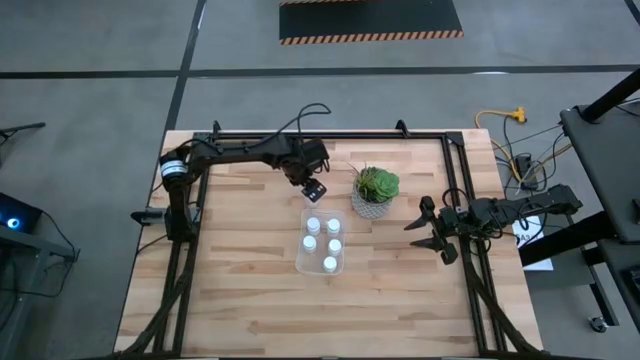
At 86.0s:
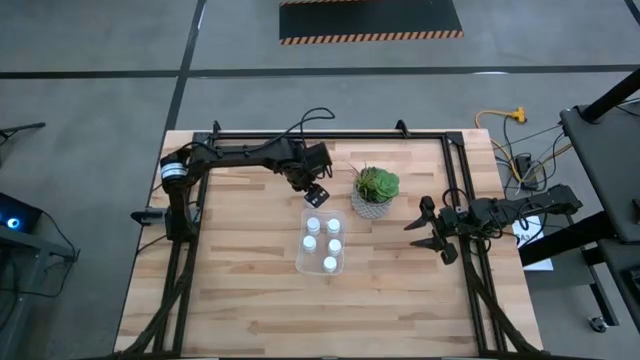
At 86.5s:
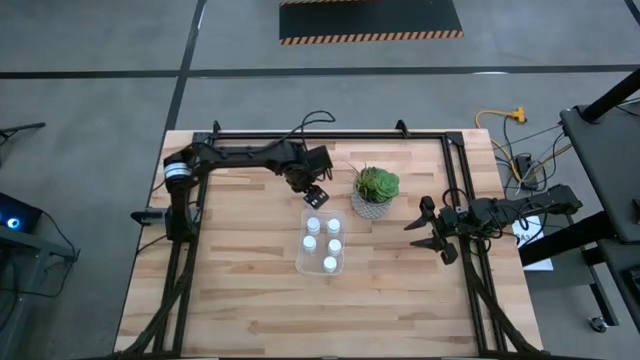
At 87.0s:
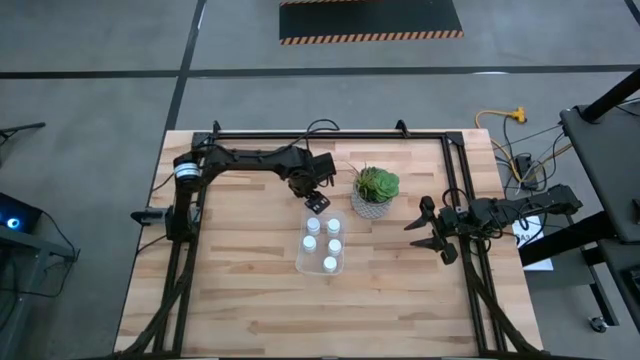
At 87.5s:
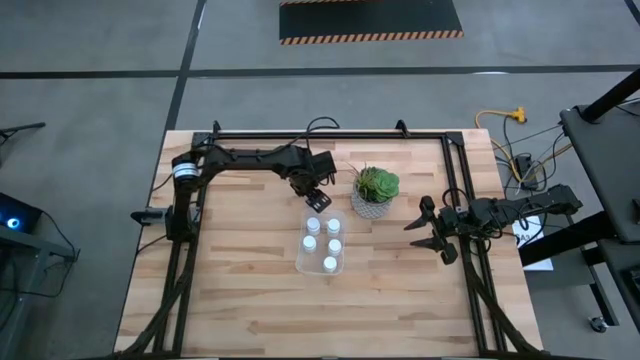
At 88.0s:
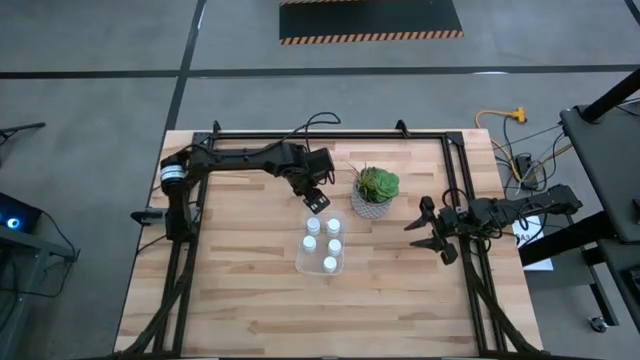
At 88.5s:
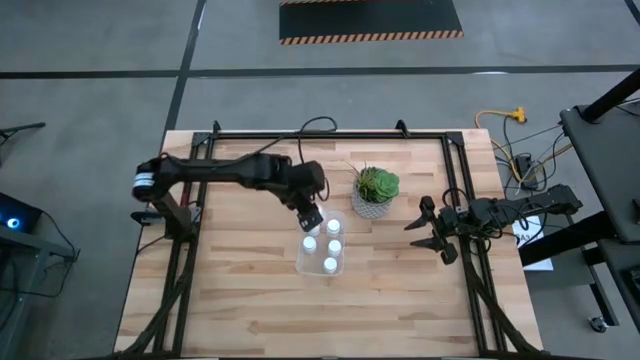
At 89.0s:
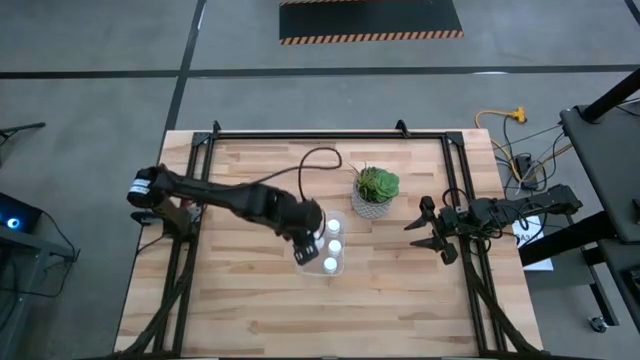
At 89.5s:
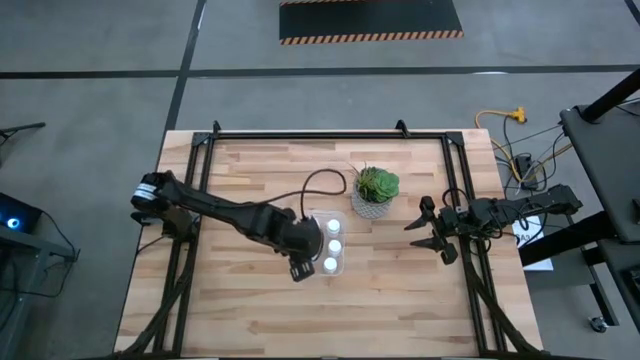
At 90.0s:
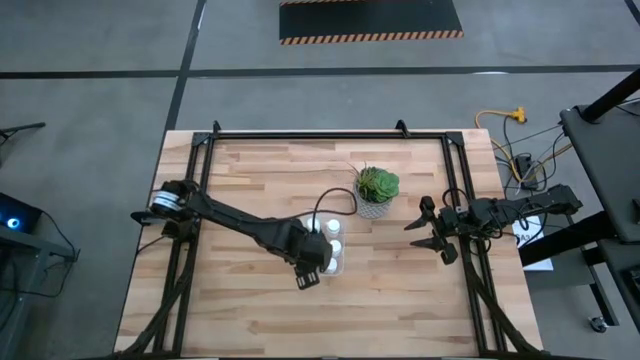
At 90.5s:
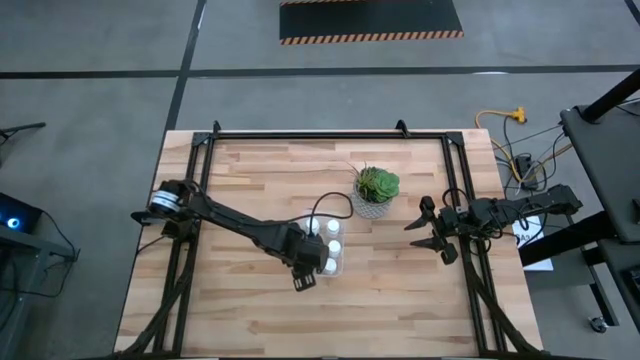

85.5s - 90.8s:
Task: Pick and place pill bottles into a basket
Put the white medicine bottle into the transparent bin

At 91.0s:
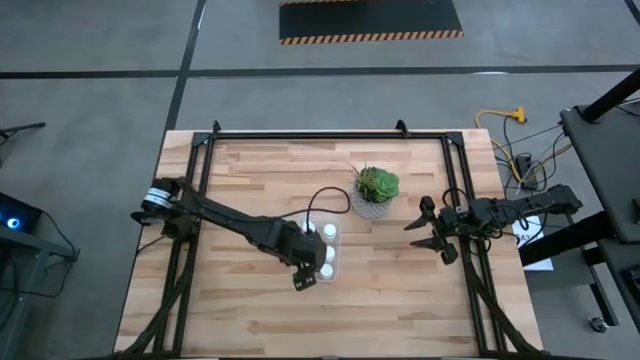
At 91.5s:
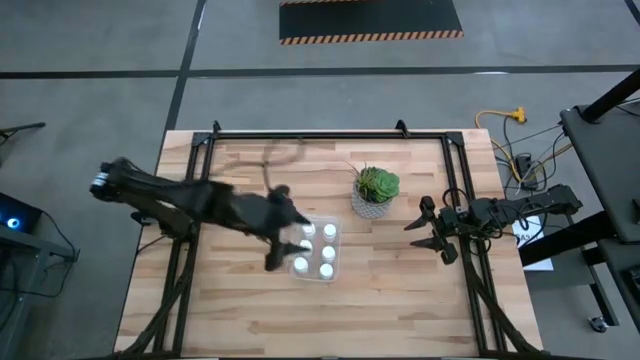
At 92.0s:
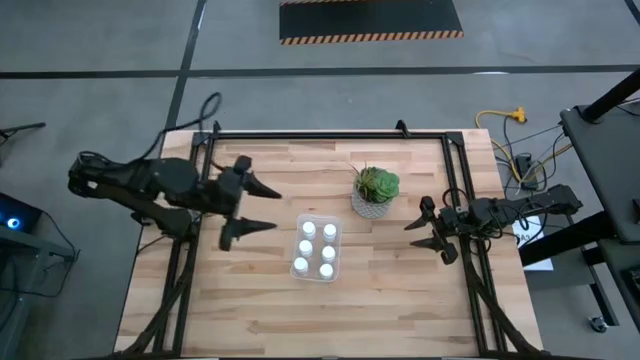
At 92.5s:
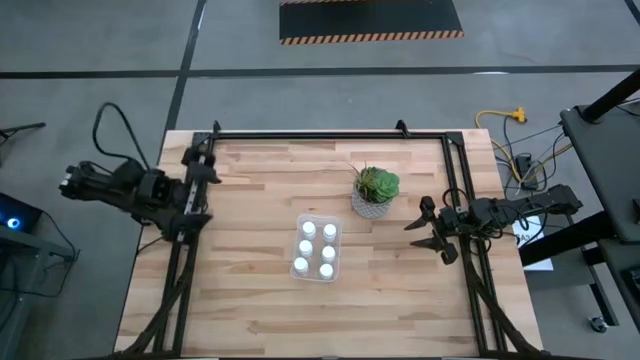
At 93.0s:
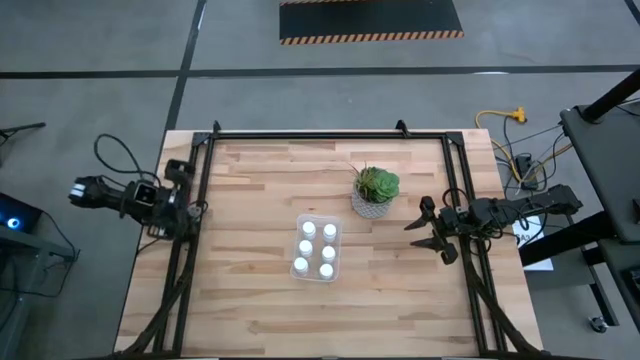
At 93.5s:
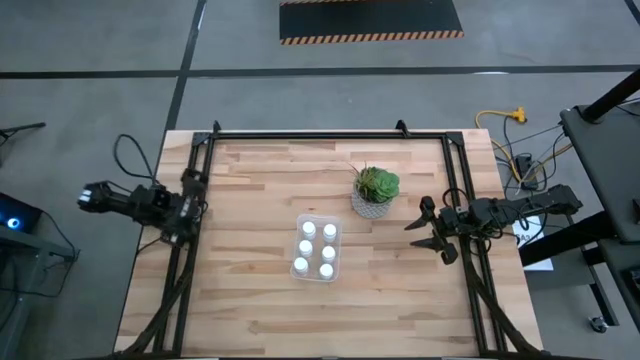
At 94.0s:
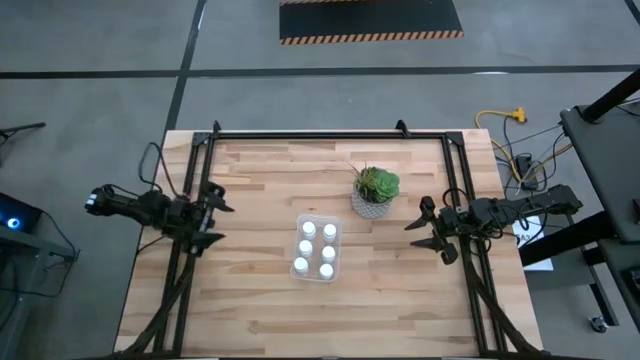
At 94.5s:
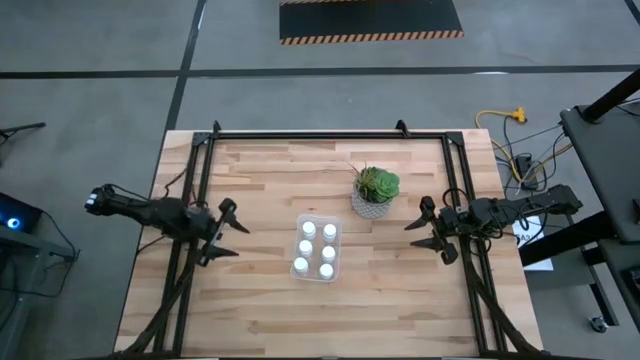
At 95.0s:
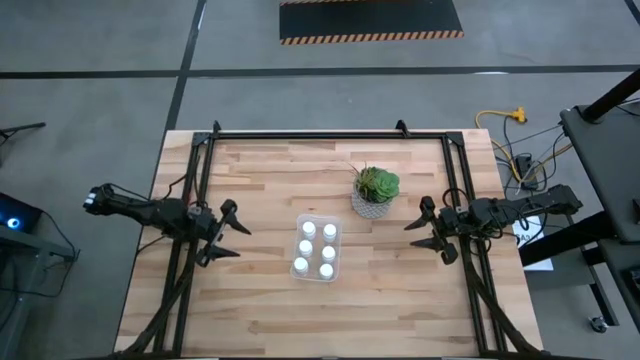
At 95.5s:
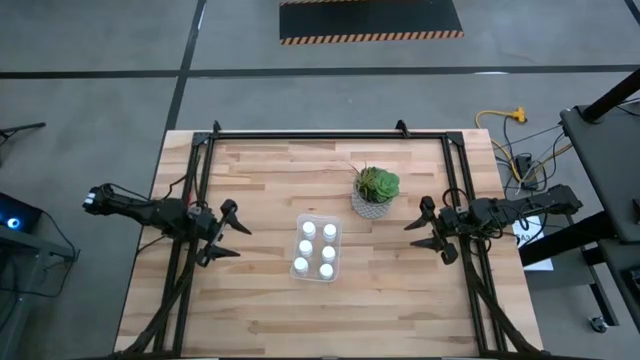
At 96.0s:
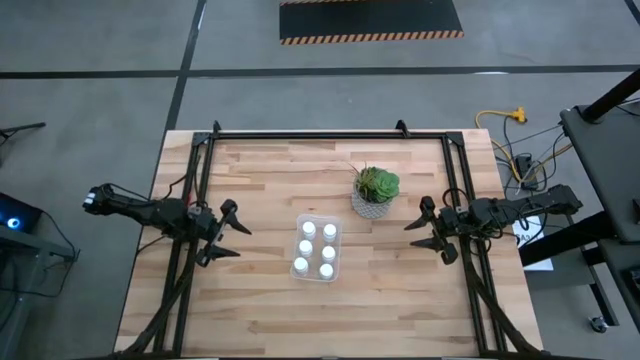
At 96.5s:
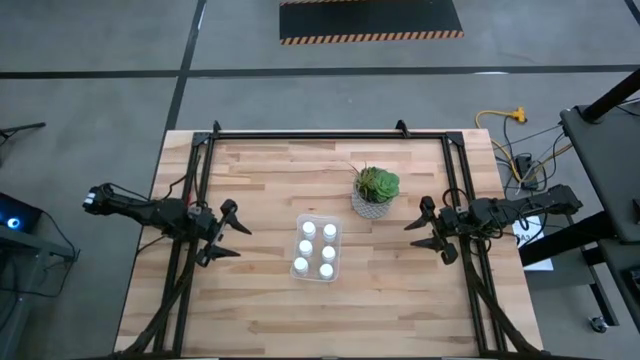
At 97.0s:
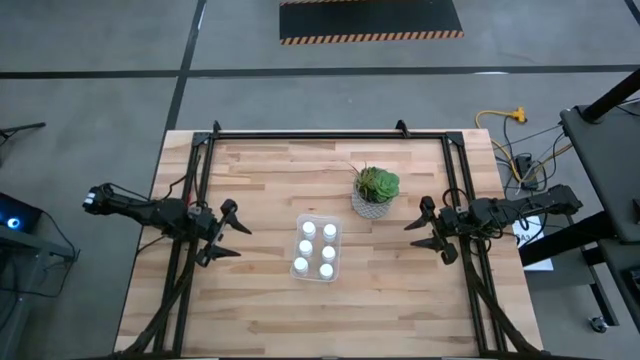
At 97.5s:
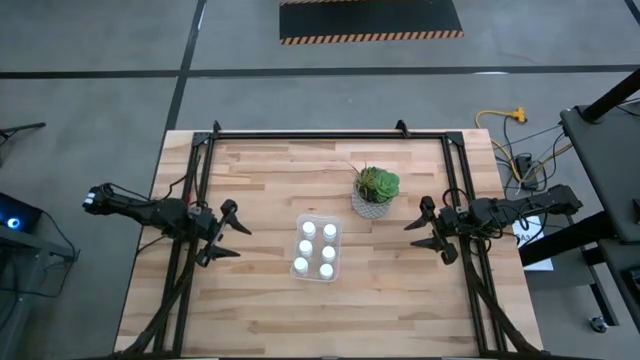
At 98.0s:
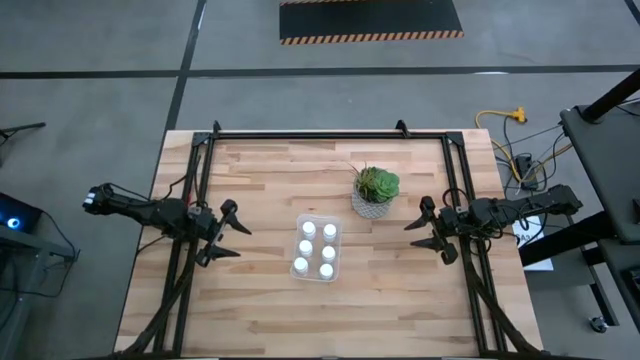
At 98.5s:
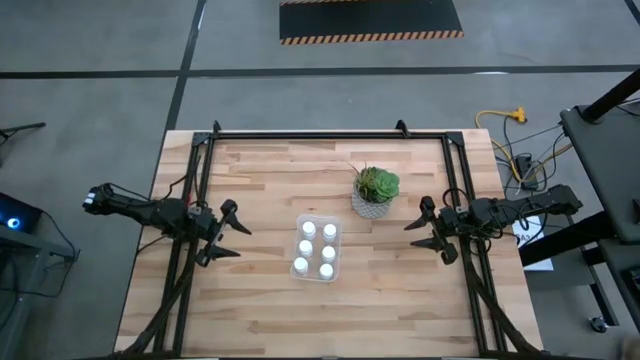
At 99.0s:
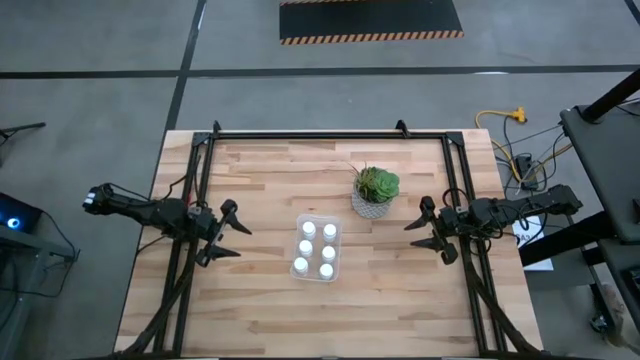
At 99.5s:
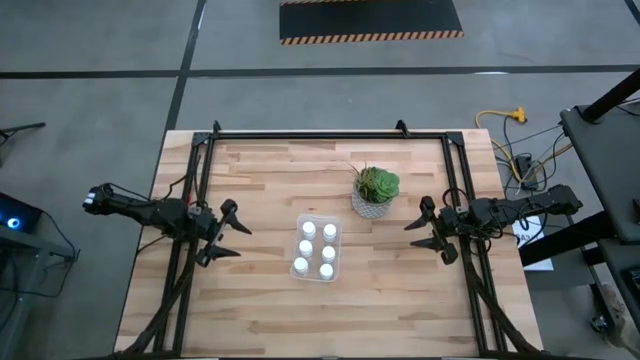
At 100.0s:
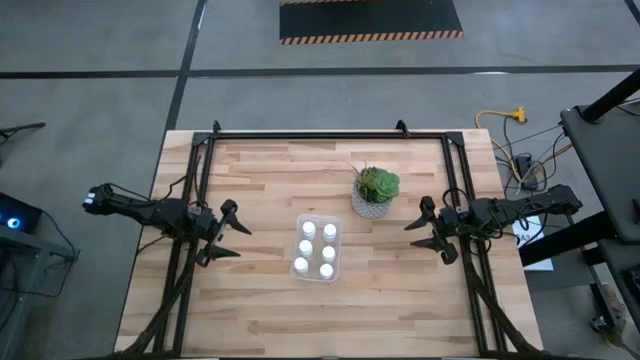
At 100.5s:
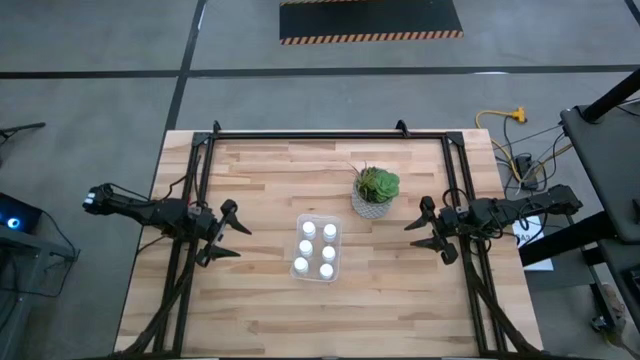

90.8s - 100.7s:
Return to Home Position

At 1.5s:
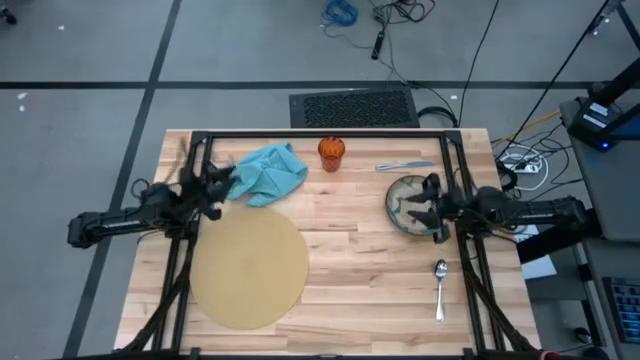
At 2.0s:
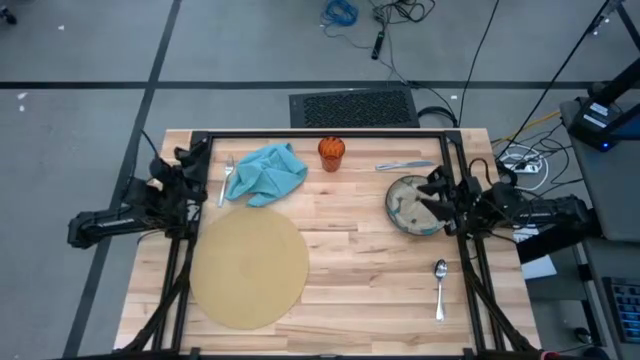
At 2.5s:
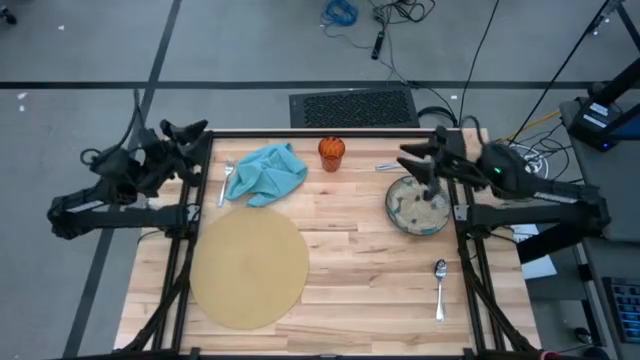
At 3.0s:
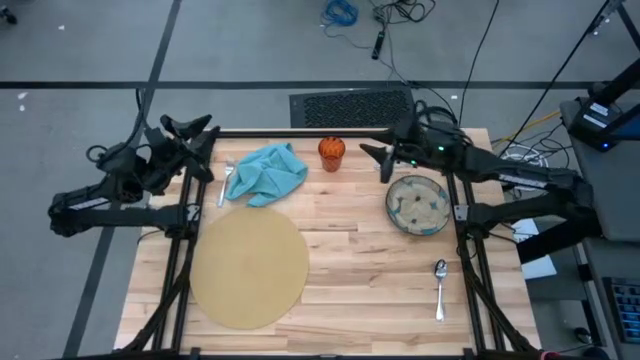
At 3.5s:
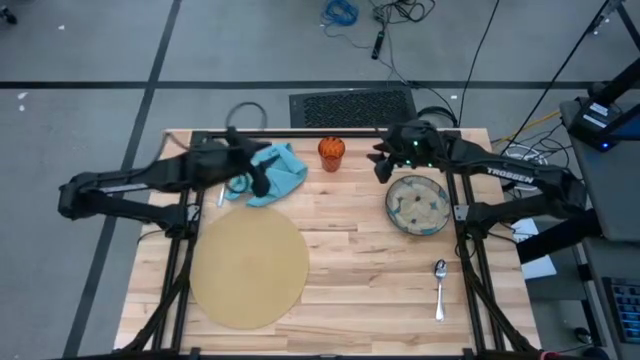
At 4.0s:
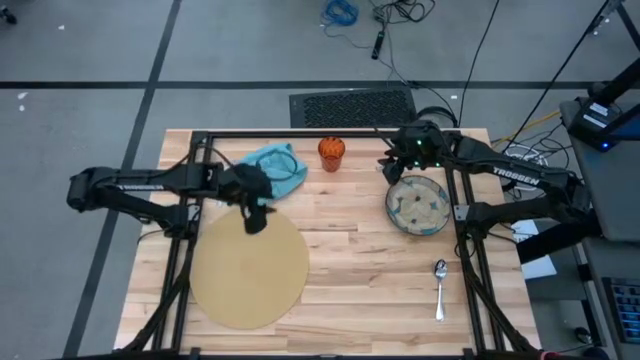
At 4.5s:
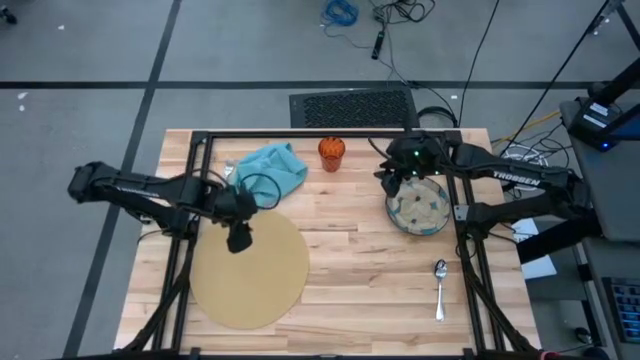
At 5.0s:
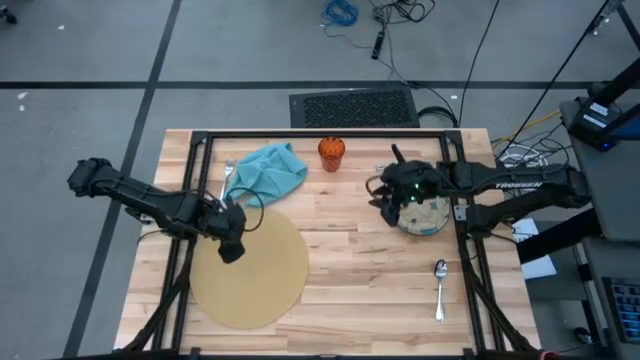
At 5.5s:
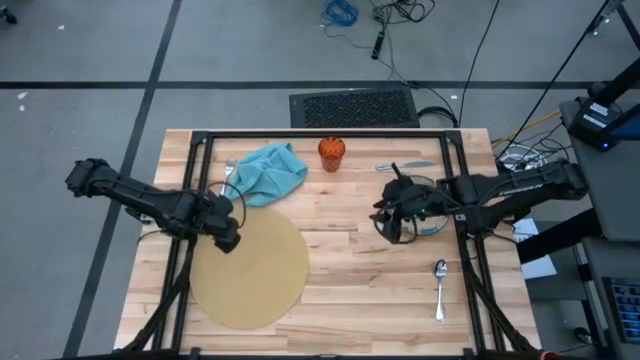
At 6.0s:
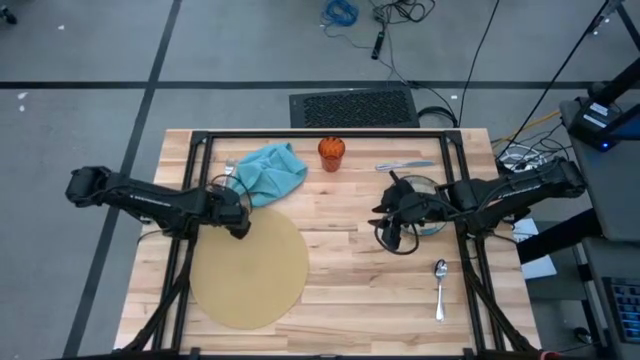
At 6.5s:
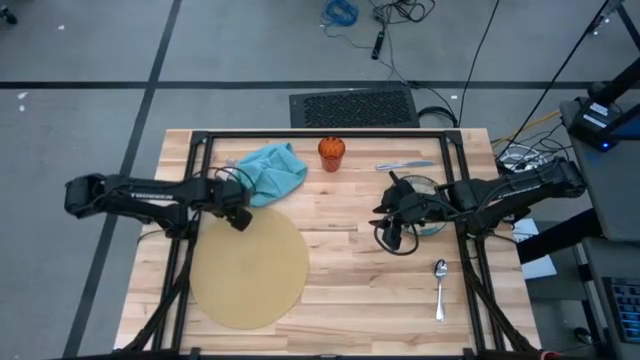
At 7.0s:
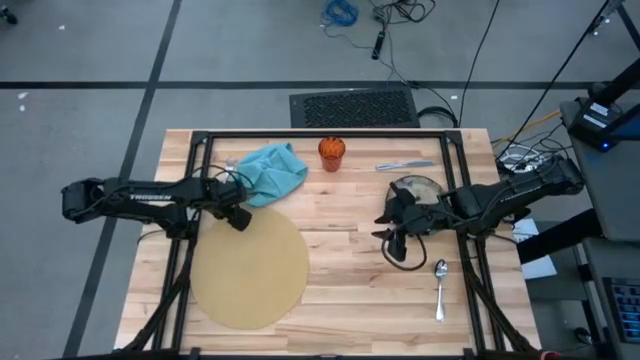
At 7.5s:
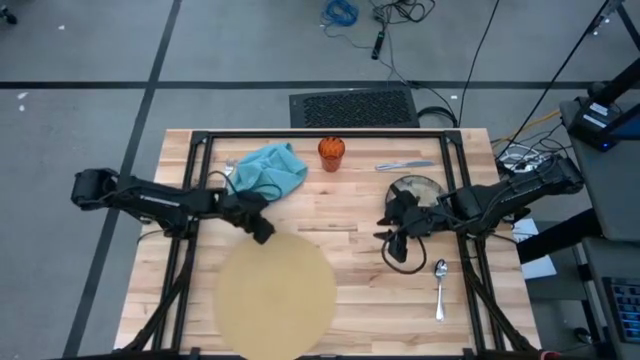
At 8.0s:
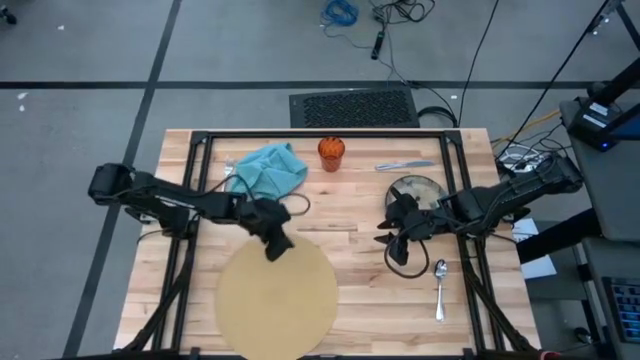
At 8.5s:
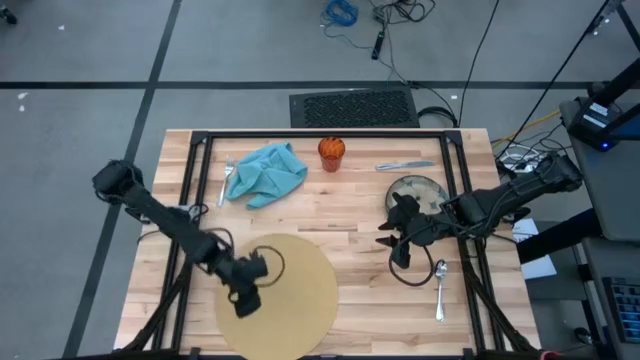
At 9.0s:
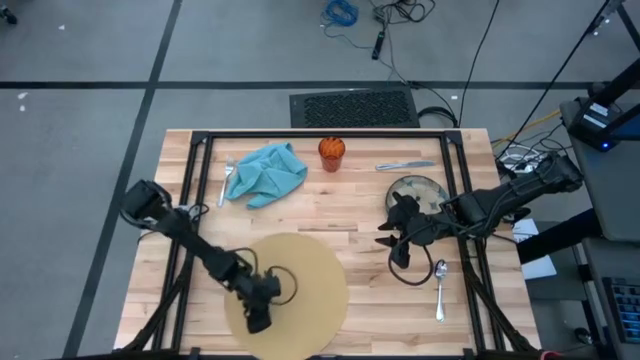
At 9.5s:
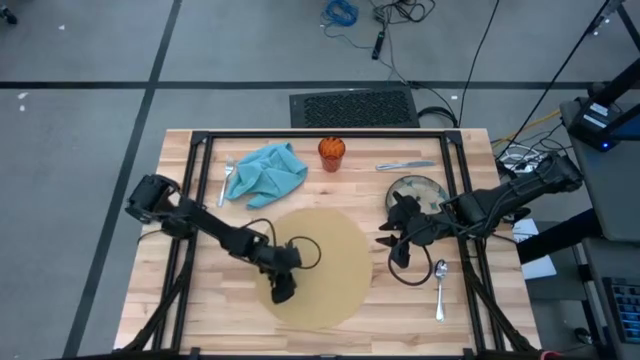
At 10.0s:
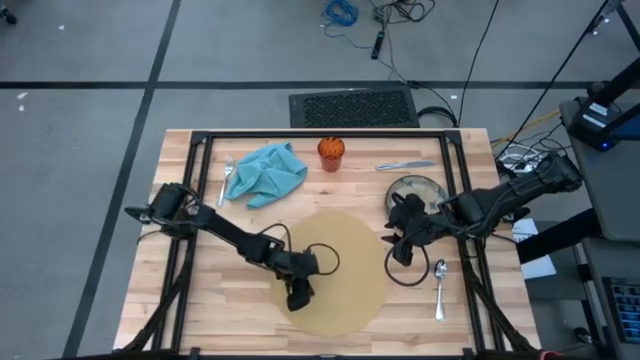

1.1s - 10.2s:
Task: Set table place
Move the beige table mat to the center of the table
